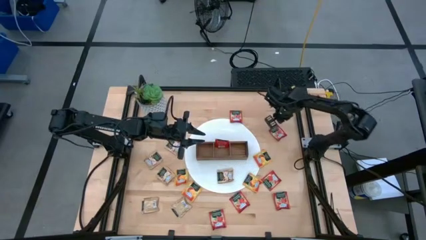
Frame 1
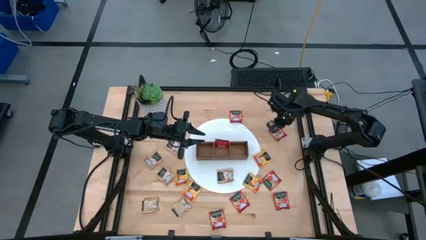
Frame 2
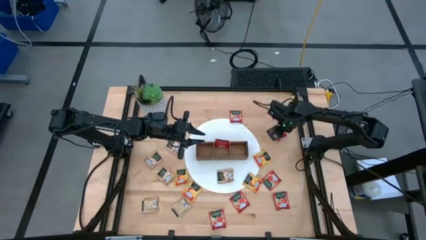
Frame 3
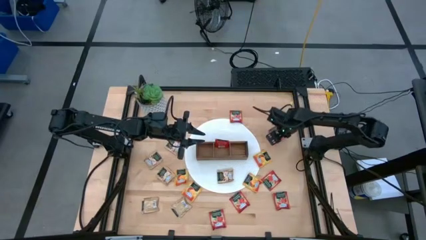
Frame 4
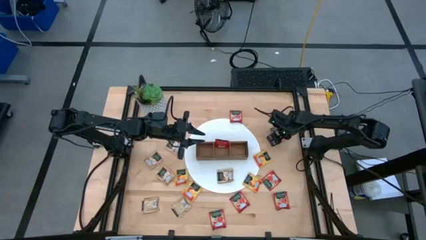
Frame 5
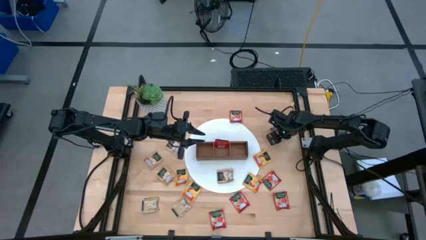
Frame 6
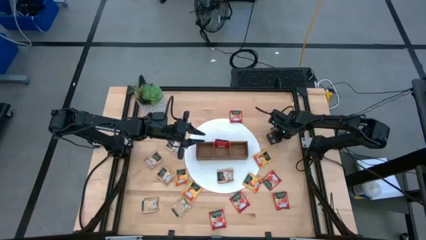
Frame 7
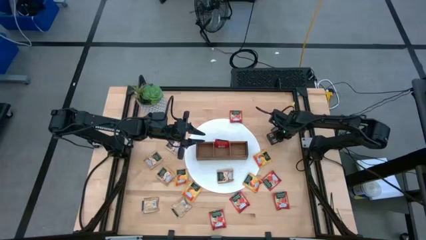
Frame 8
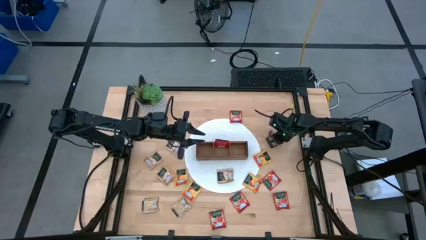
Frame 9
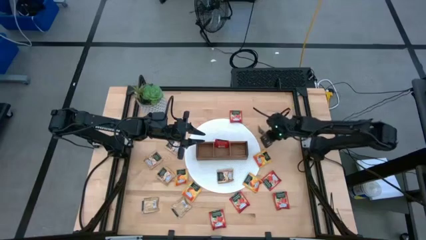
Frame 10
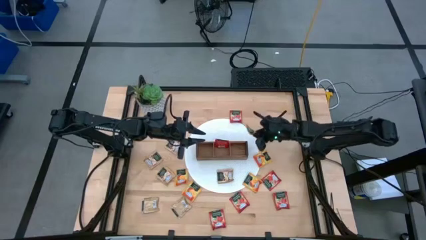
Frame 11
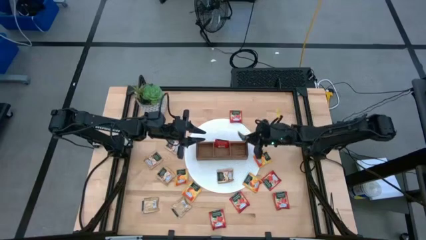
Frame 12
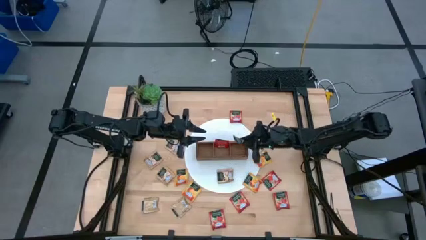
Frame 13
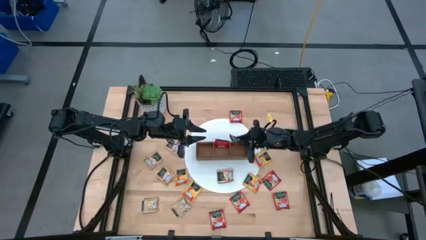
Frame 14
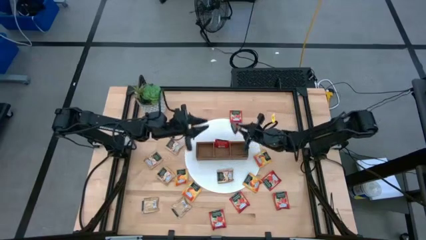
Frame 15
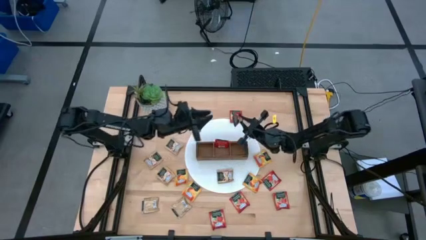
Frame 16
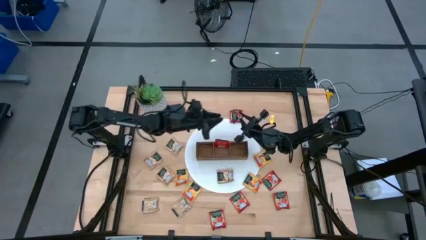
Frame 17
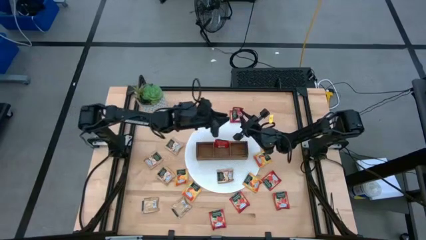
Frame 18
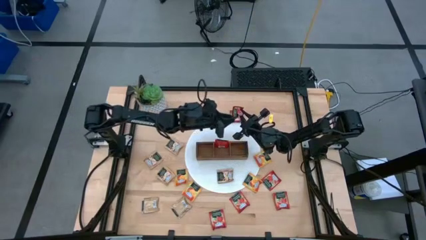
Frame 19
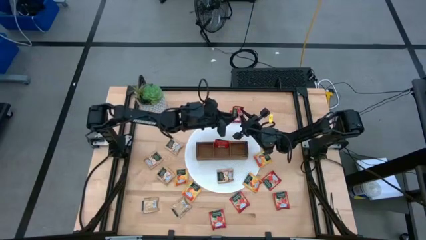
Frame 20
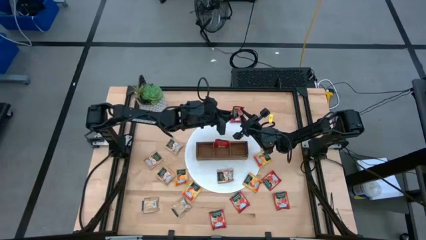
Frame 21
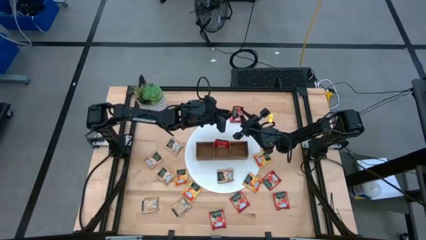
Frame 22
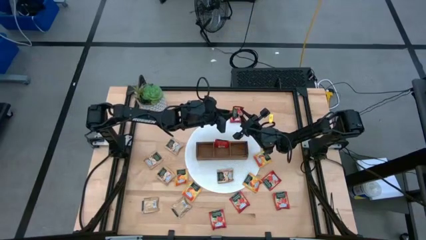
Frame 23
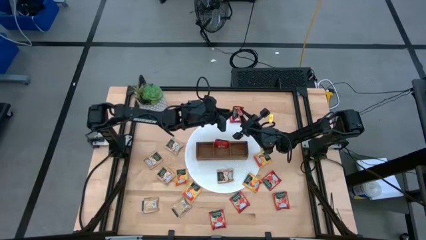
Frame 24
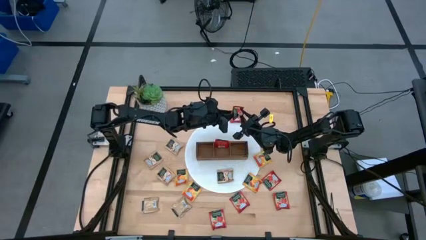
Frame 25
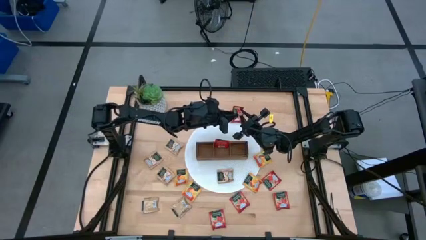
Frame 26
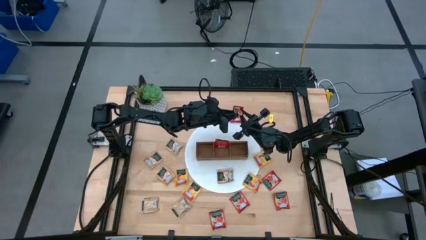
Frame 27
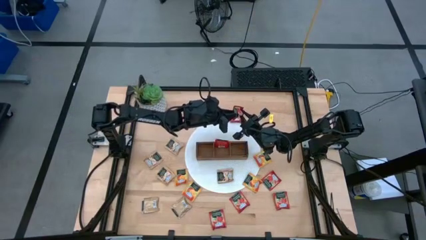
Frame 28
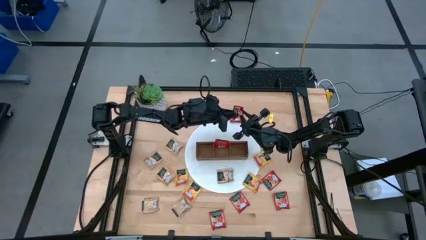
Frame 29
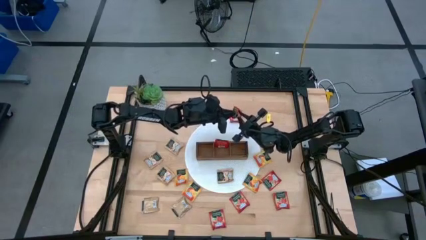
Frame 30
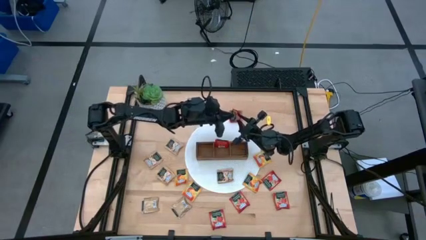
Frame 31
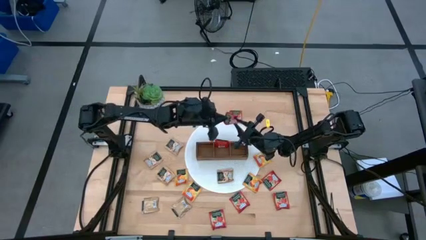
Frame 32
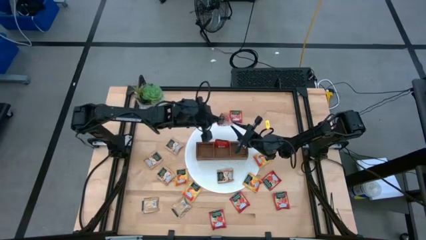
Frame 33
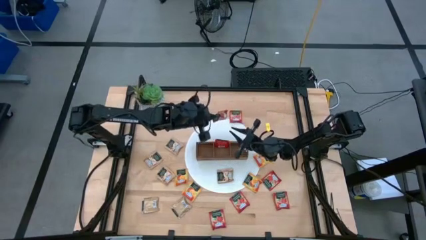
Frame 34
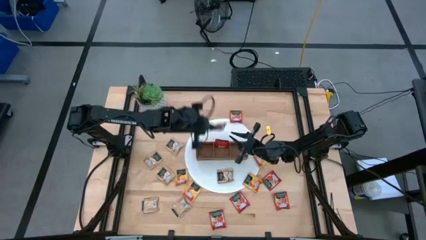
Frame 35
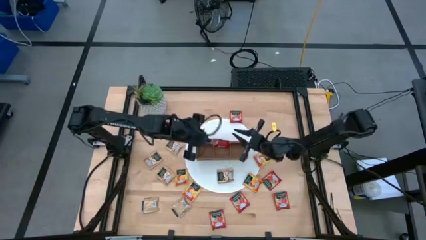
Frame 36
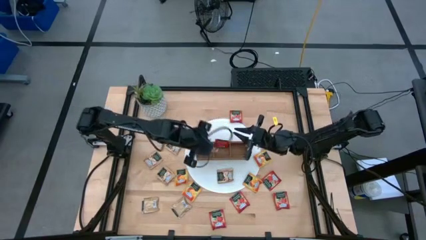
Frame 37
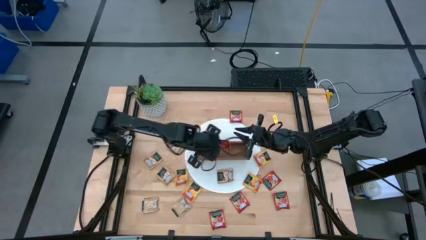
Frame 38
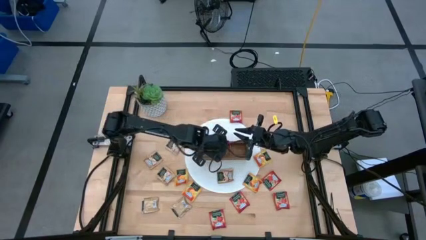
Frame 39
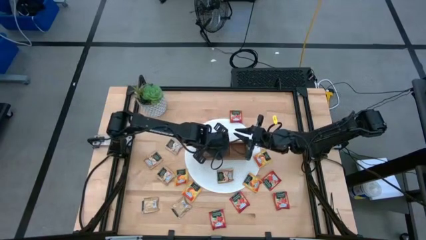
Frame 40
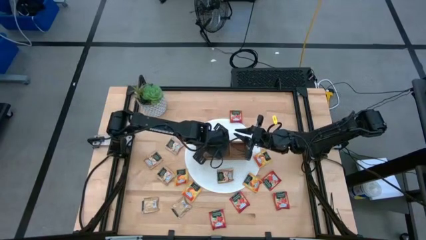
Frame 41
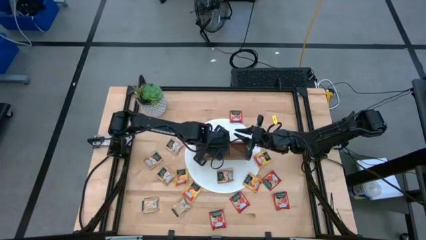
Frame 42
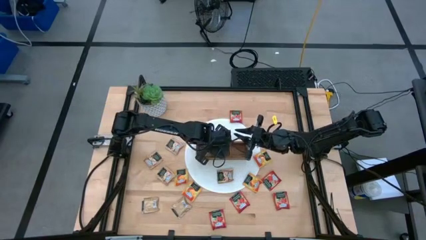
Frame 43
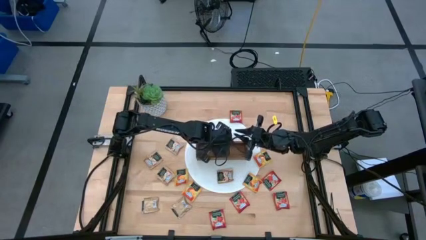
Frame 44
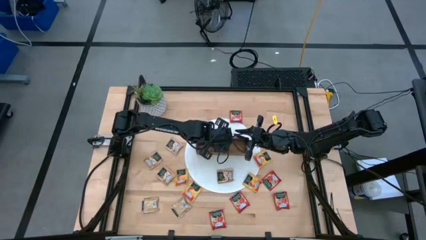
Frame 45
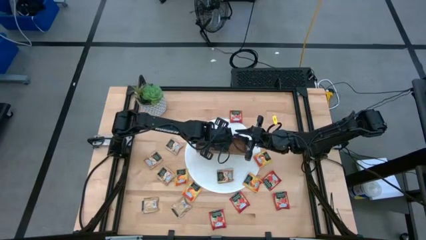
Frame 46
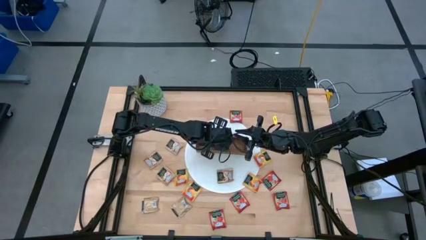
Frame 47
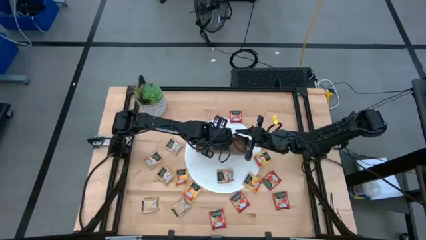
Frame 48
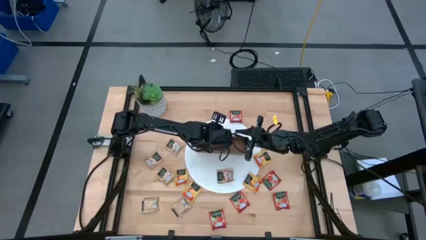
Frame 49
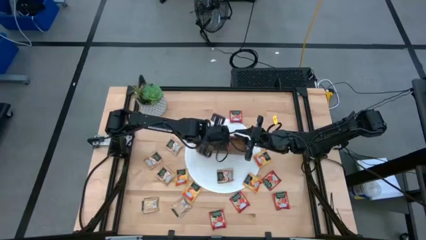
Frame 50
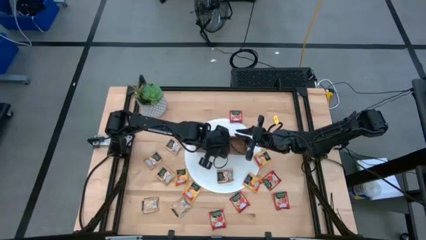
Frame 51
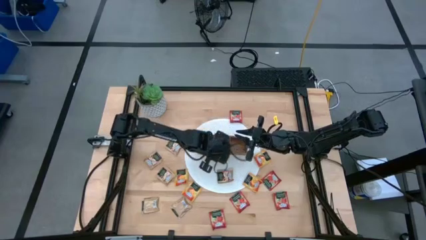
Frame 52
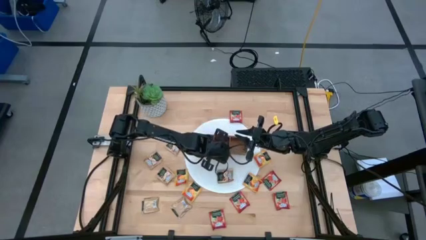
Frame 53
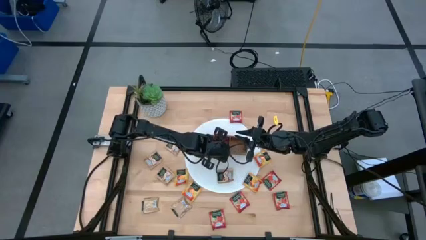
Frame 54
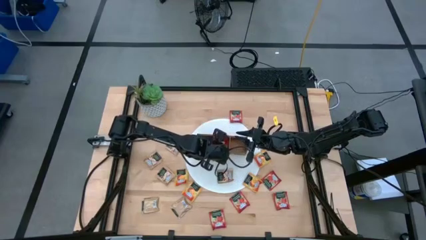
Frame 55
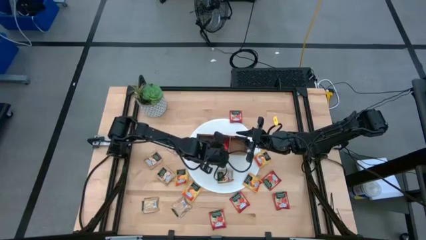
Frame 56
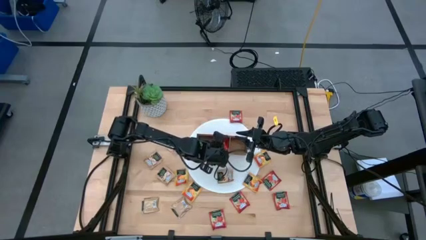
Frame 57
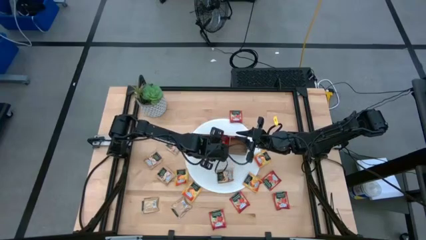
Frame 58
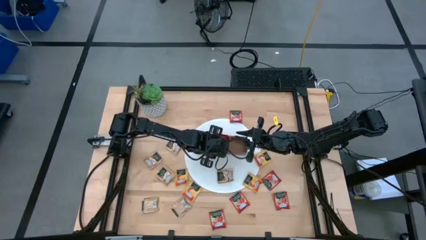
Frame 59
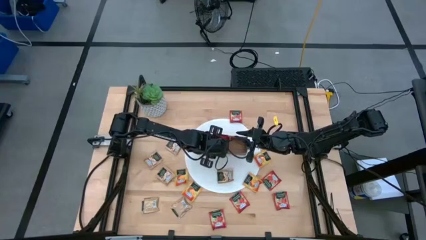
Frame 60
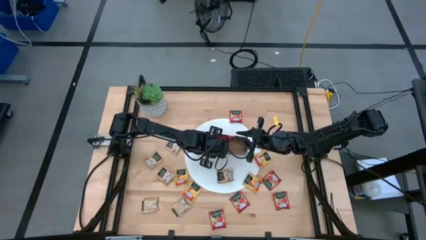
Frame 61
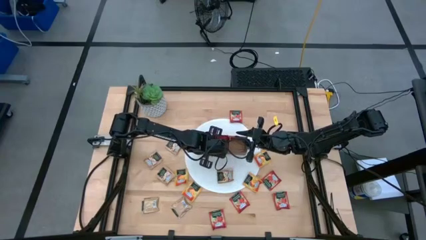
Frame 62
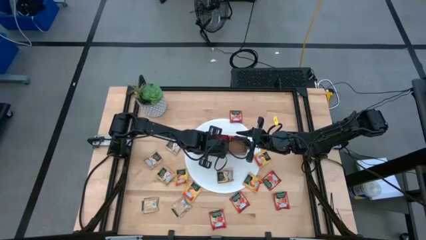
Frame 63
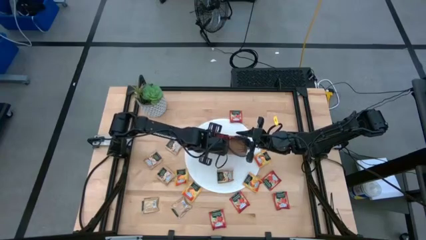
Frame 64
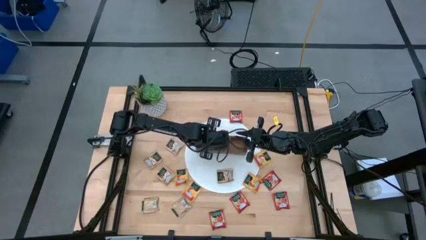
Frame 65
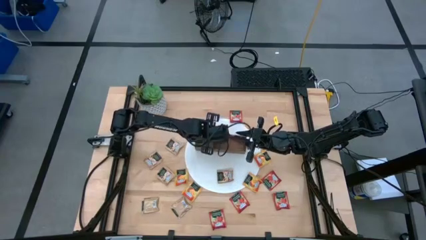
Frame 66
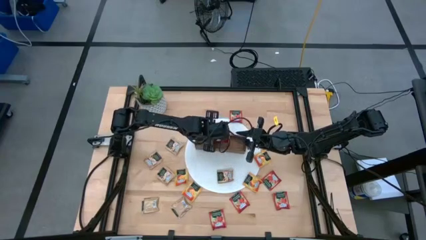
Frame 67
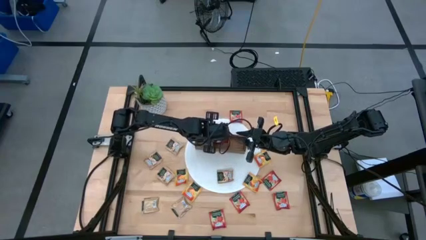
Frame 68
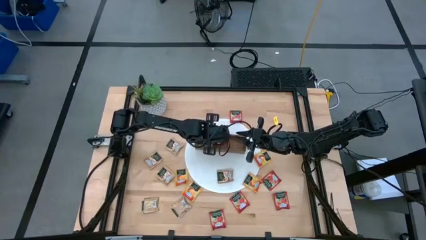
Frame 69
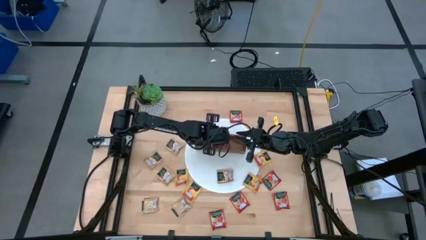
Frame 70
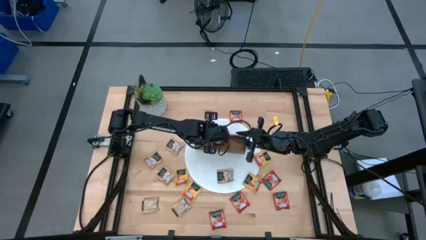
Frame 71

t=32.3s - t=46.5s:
Task: Pick & Place Tea
Put the red tea bag into the middle section of the wooden organizer

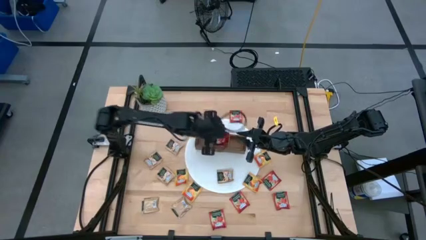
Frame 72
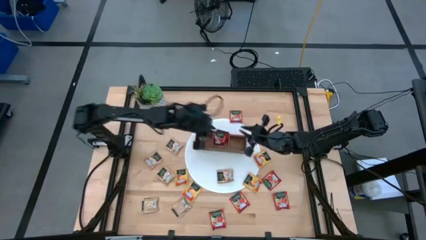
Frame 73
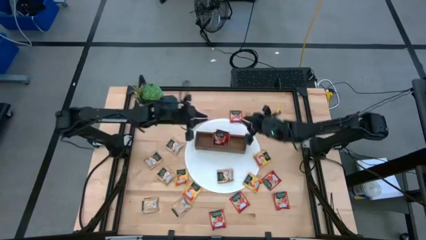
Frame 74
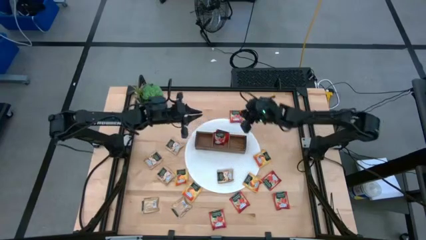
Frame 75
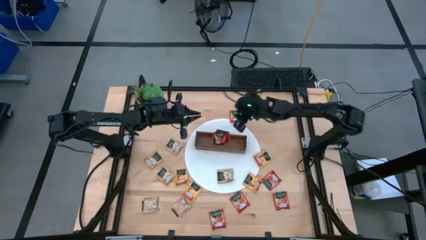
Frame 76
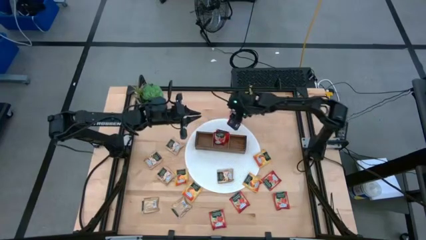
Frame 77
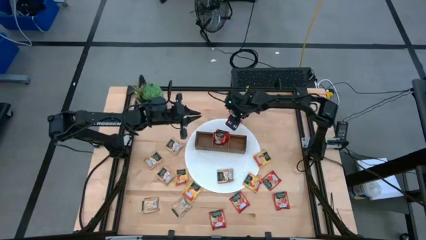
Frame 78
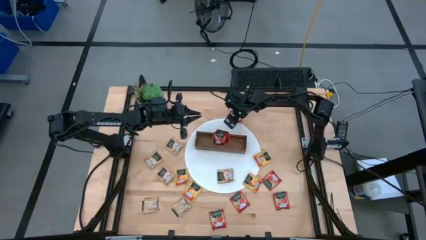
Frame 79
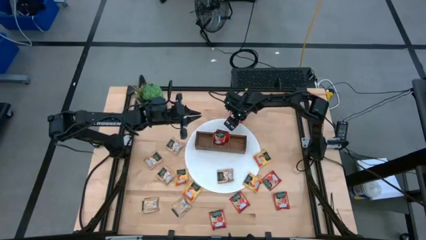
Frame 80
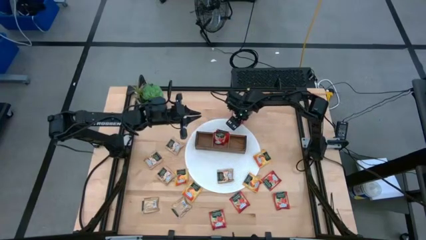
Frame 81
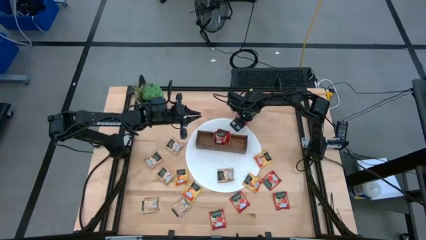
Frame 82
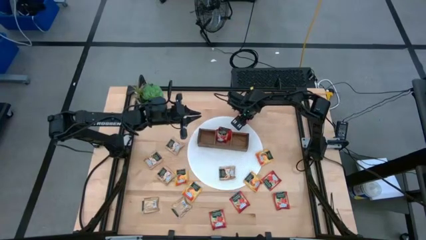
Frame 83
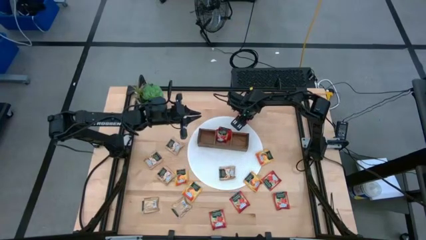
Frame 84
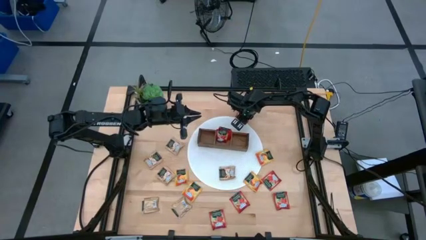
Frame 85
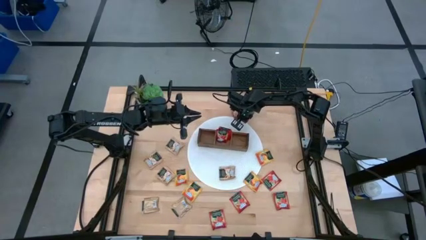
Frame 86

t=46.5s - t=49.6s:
Put the red tea bag into the middle section of the wooden organizer
